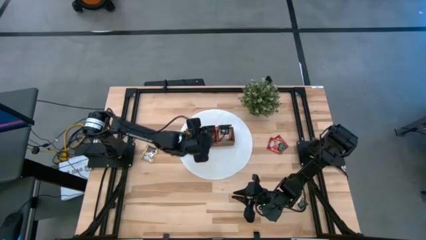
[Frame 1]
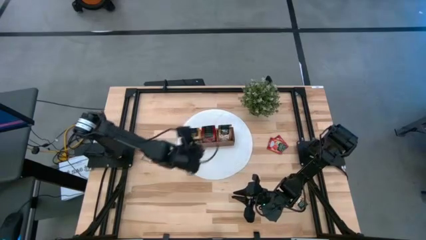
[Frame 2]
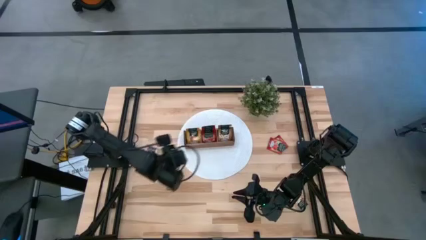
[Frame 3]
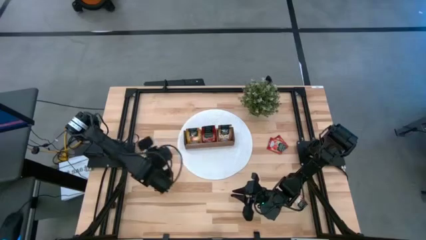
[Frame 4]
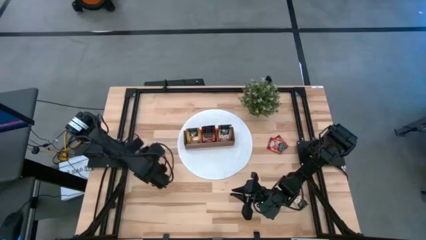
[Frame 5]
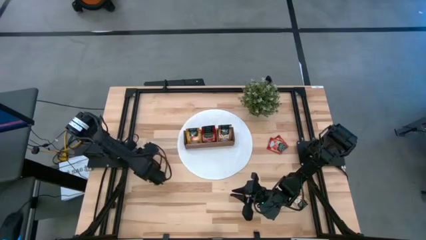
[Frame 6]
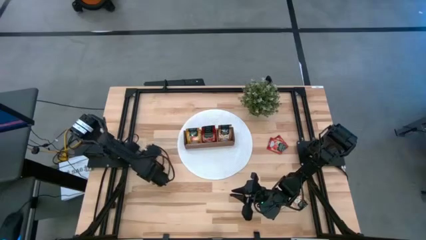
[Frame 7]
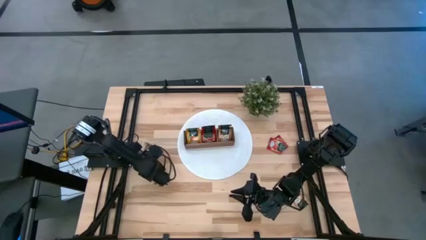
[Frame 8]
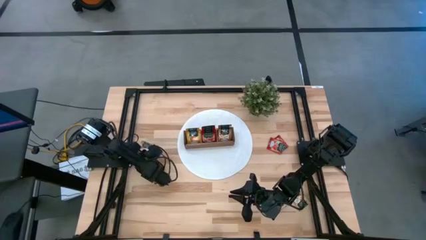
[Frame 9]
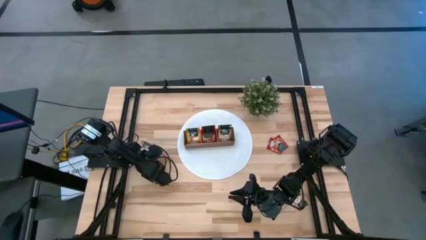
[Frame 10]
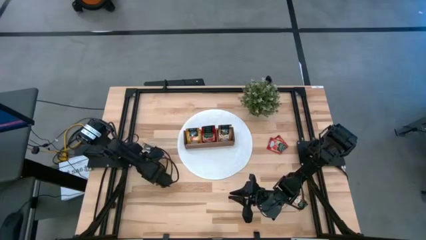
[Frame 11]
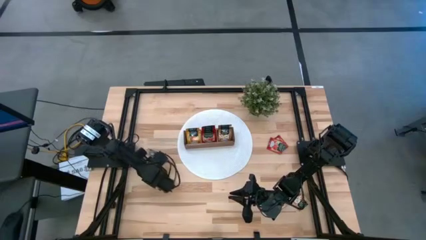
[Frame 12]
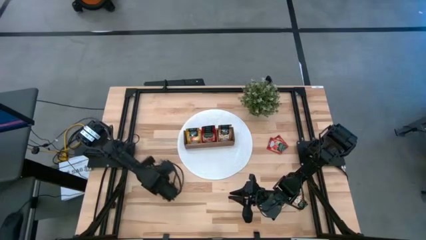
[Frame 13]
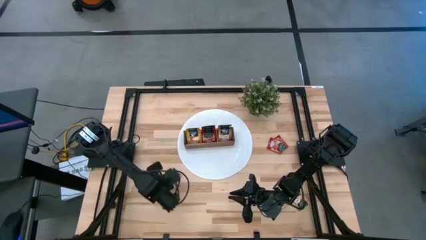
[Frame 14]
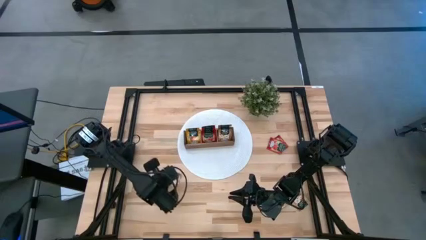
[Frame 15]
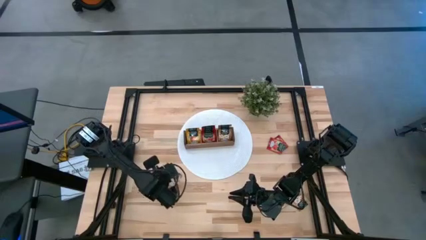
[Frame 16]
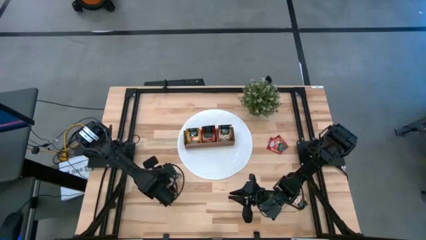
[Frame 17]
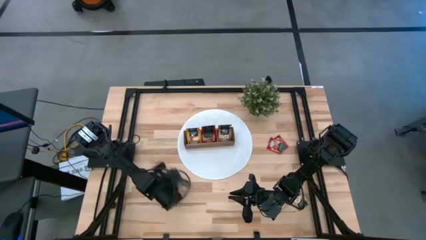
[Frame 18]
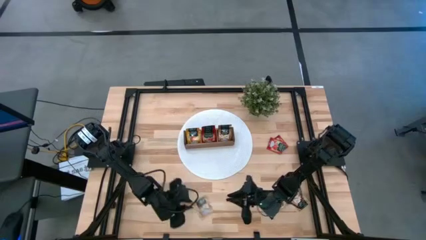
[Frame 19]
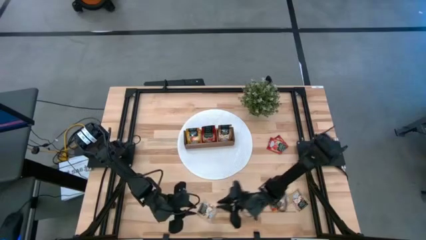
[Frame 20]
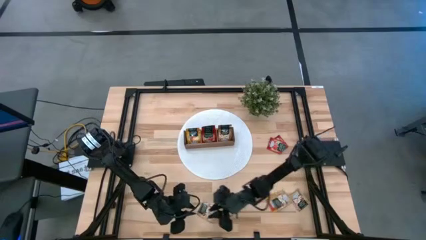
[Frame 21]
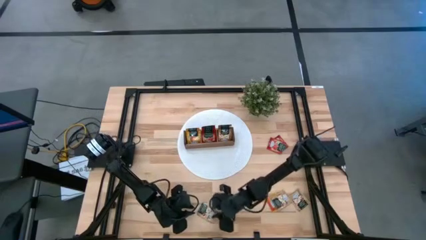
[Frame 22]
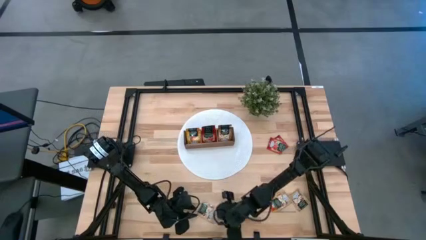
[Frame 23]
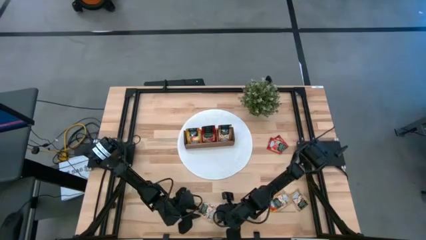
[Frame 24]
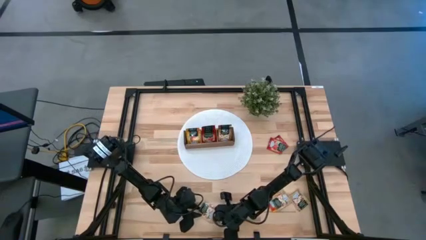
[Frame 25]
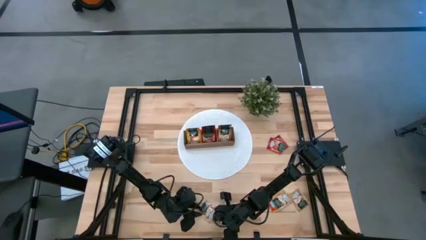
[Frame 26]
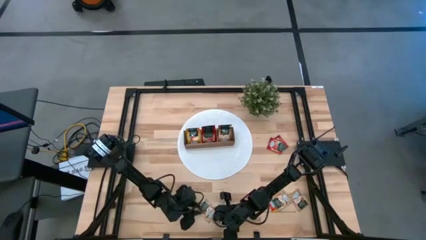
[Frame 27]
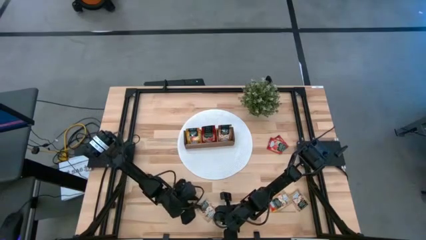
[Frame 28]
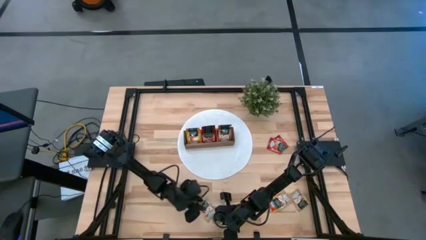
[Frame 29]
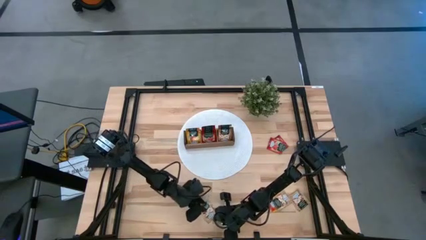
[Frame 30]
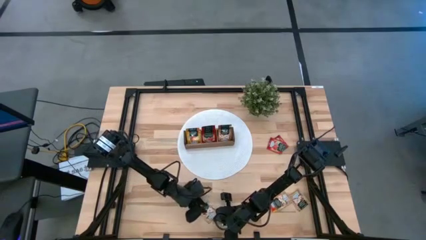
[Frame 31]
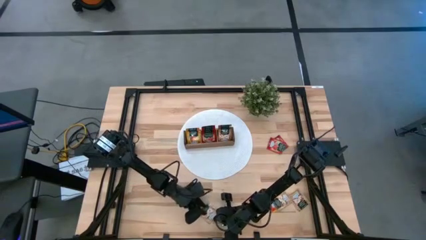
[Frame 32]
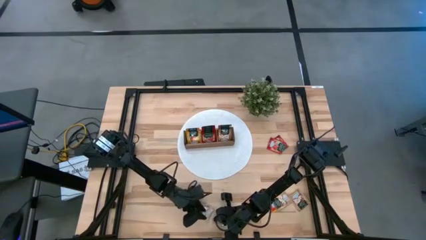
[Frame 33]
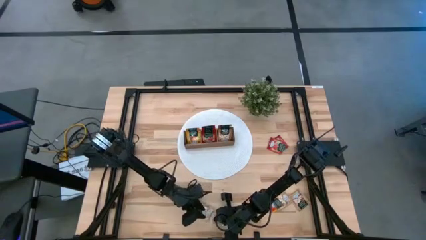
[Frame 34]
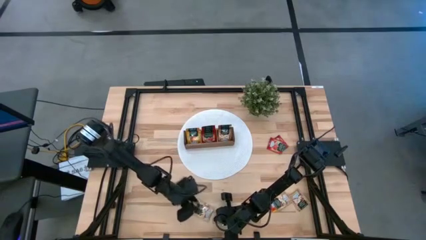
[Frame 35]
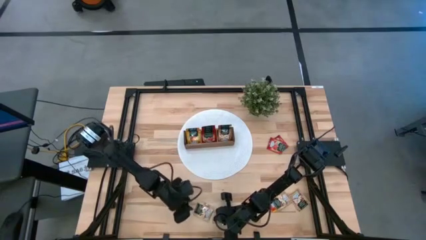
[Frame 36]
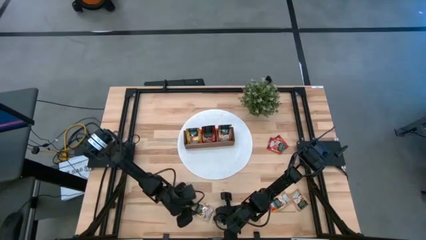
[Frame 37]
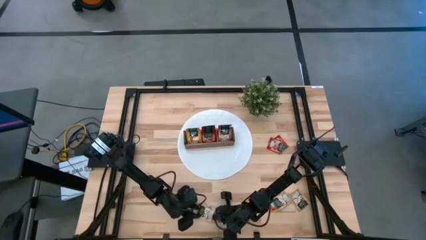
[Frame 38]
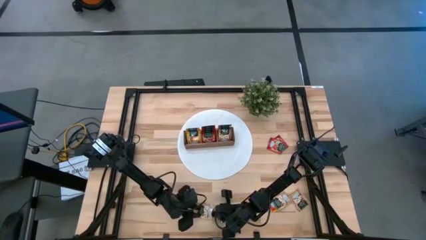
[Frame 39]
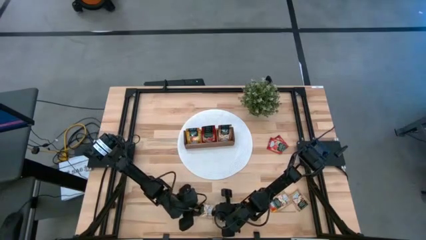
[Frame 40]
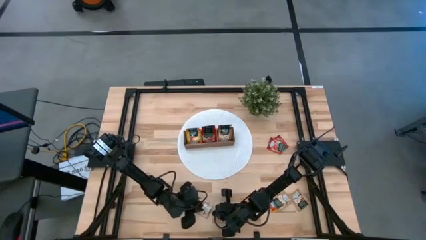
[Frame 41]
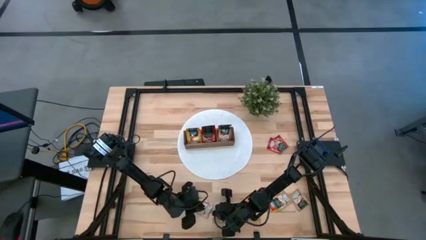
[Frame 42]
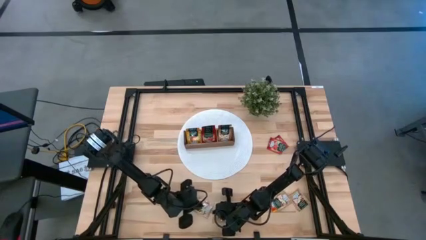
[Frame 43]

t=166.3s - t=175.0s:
Task: Pick & Place Tea
Put the brown tea bag into the right section of the wooden organizer

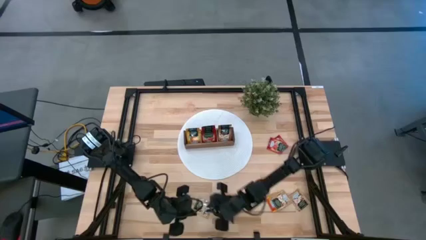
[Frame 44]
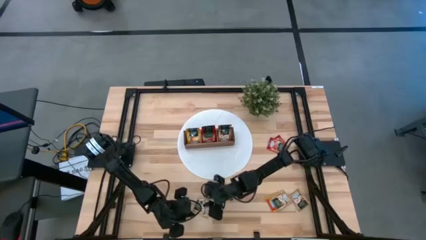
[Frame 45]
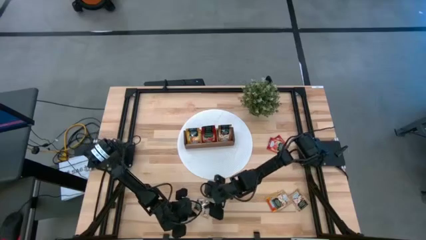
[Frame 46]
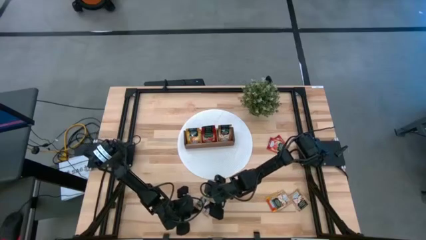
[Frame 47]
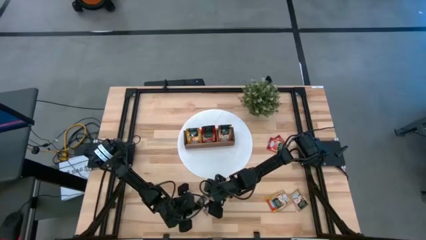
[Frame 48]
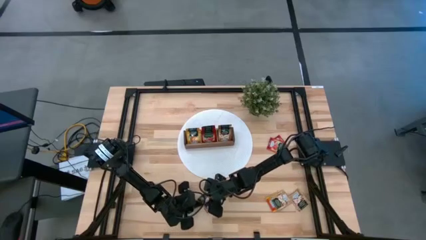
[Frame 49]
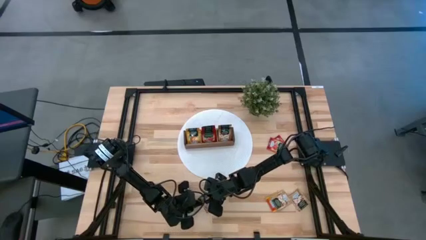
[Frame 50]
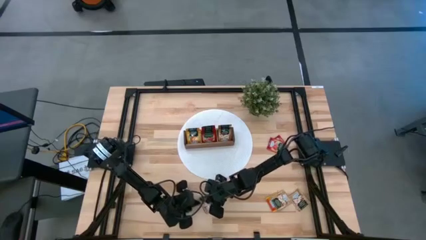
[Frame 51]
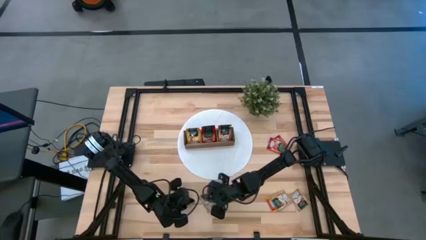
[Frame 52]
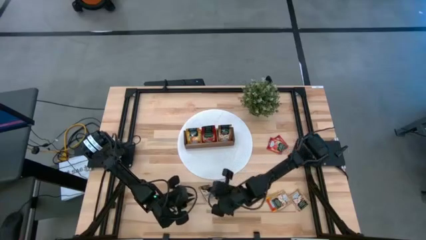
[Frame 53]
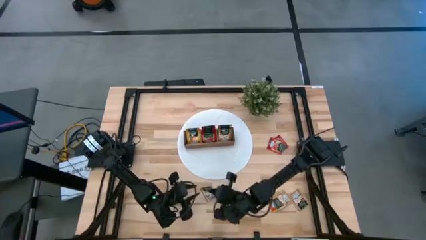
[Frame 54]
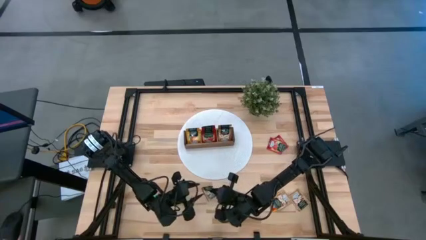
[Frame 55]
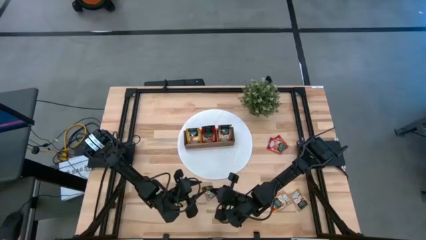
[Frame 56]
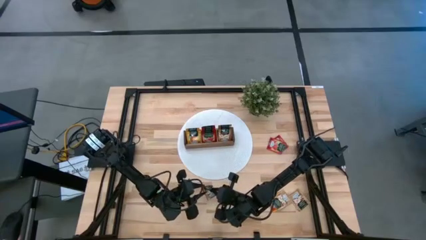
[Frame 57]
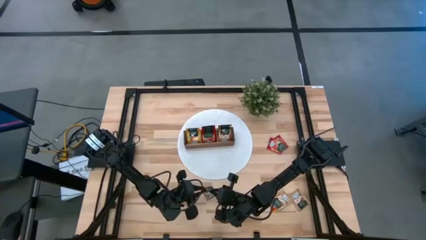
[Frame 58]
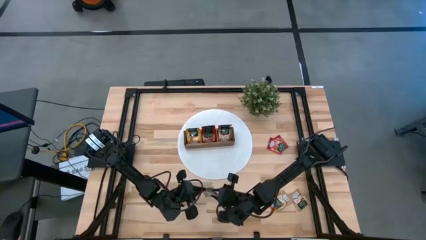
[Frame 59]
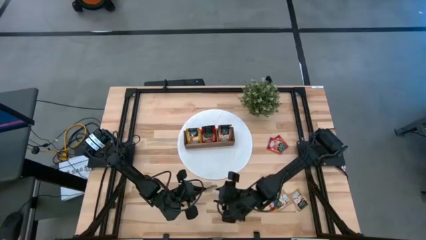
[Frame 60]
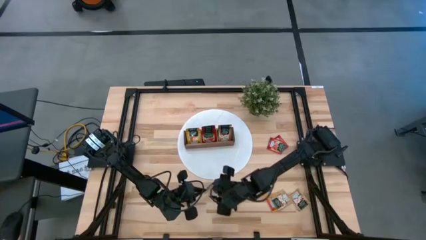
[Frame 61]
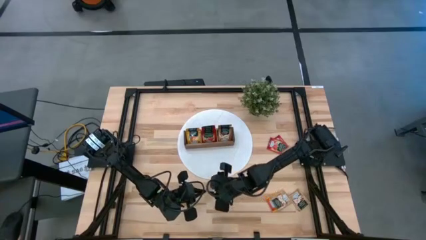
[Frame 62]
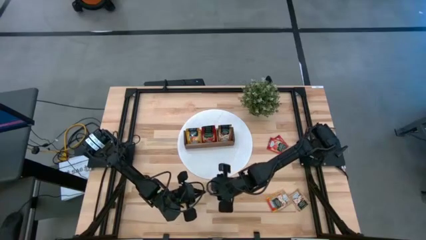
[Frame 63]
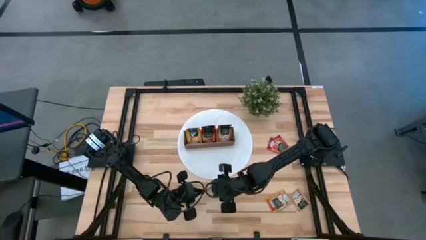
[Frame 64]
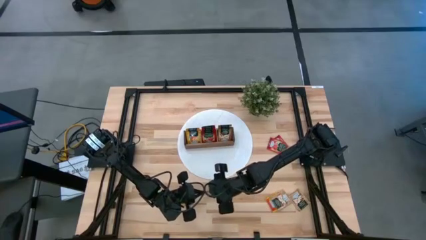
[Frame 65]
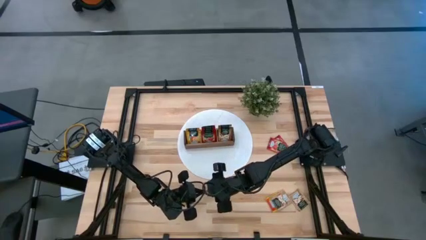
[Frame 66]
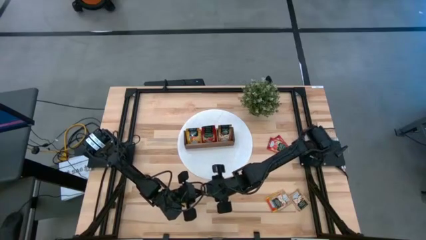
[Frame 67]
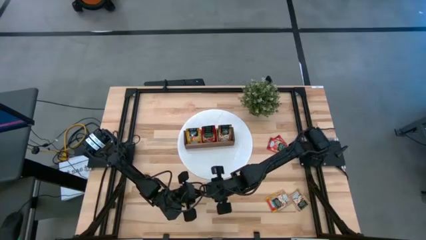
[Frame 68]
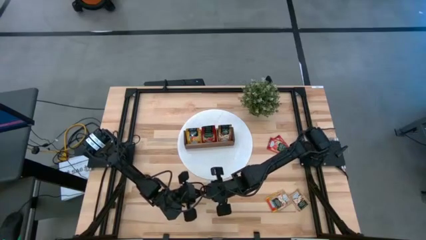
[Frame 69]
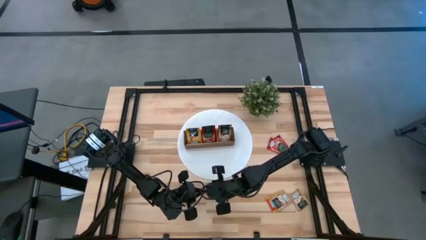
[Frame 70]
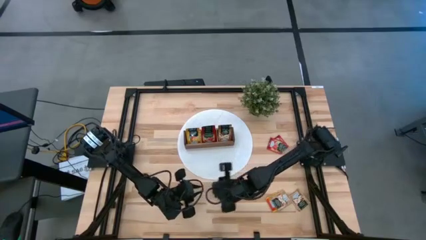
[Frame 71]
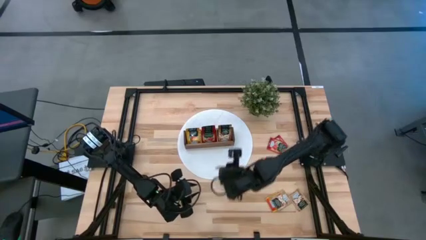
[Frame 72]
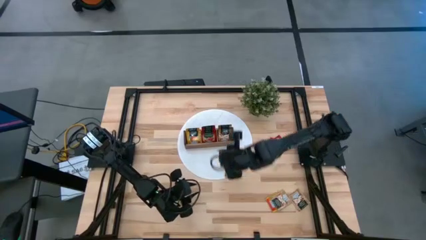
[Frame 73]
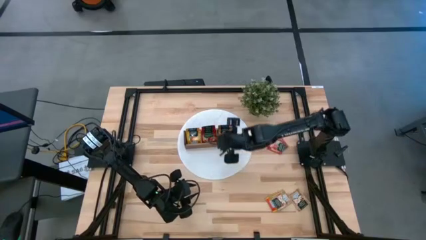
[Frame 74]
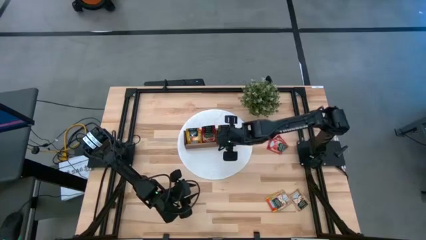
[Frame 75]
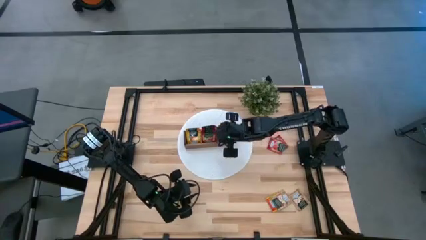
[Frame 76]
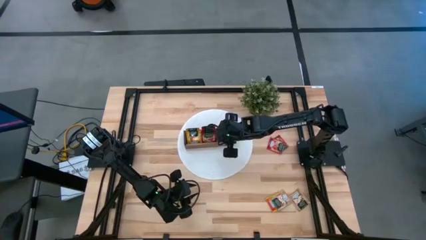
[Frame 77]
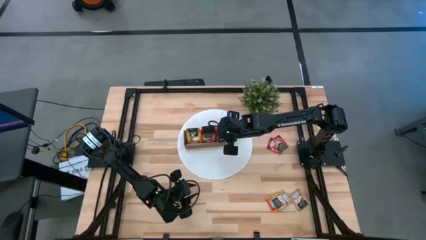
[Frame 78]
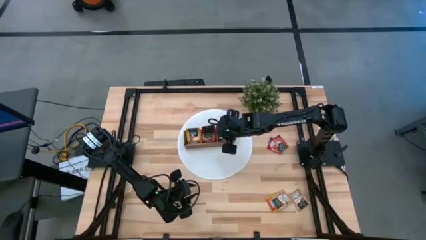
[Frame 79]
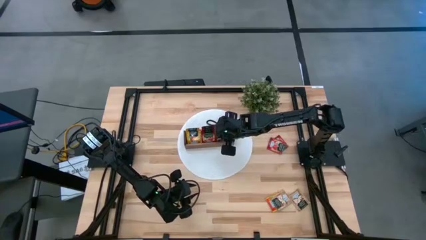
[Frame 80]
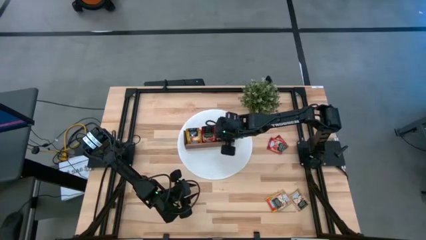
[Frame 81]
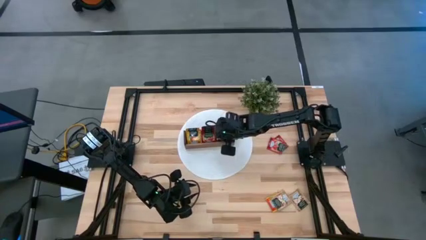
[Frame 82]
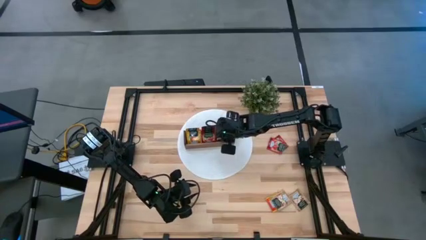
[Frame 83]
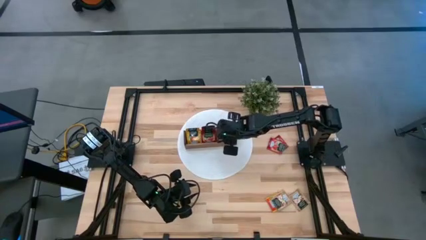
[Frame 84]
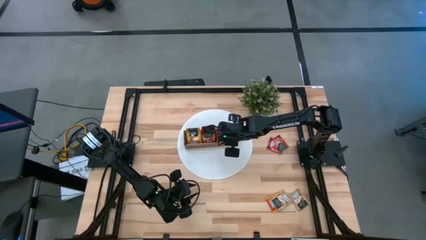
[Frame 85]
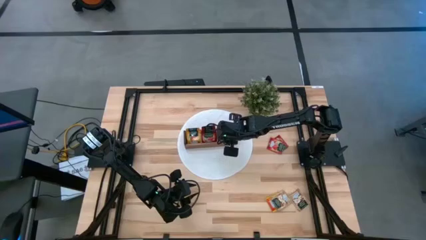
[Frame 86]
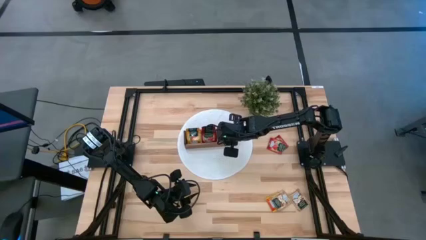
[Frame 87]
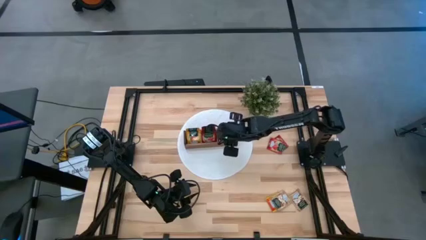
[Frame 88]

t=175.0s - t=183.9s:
Put the brown tea bag into the right section of the wooden organizer
